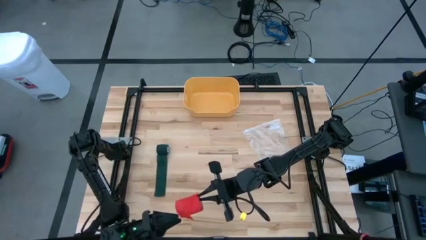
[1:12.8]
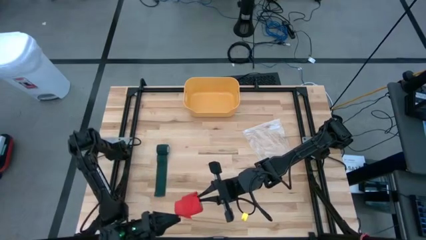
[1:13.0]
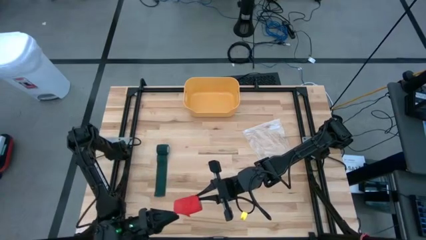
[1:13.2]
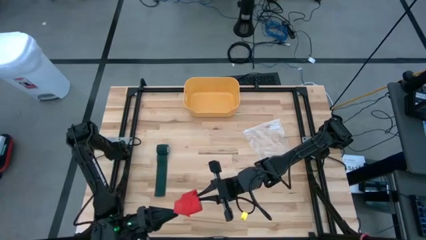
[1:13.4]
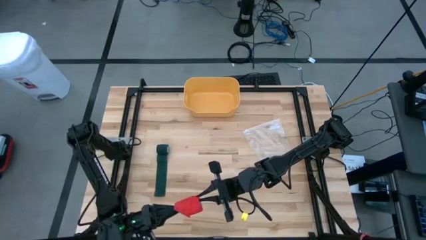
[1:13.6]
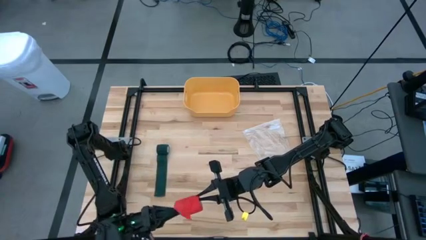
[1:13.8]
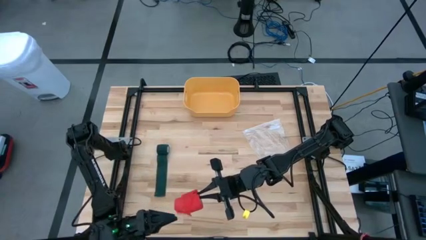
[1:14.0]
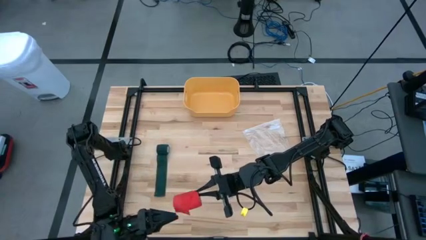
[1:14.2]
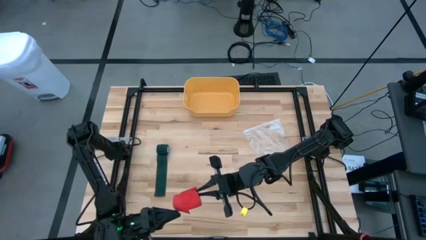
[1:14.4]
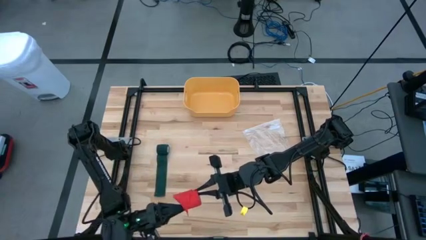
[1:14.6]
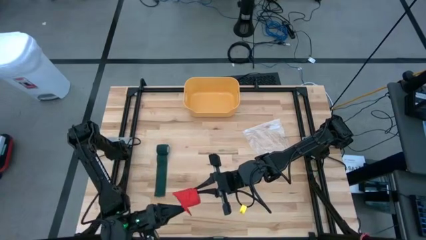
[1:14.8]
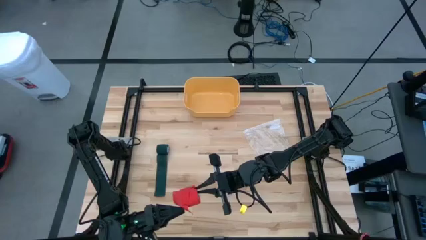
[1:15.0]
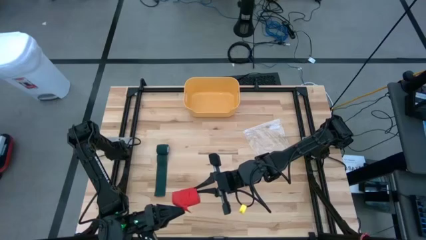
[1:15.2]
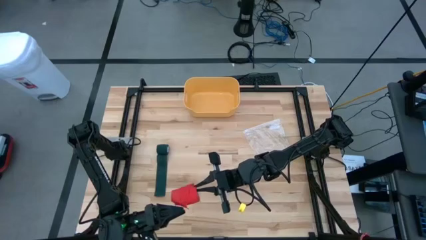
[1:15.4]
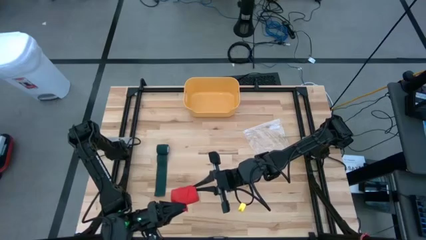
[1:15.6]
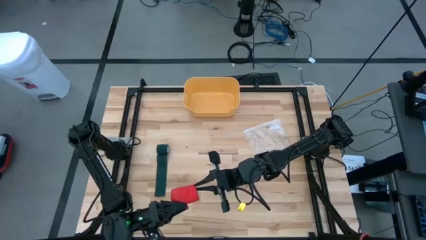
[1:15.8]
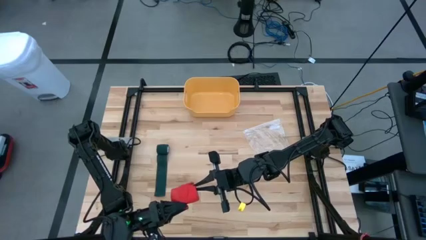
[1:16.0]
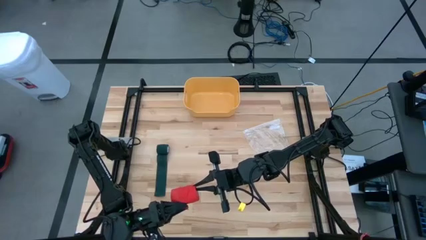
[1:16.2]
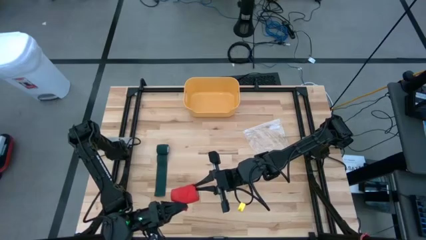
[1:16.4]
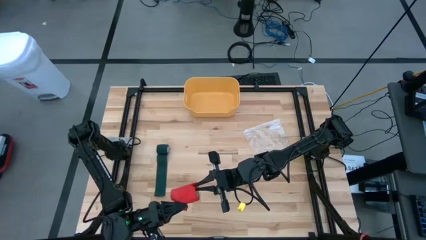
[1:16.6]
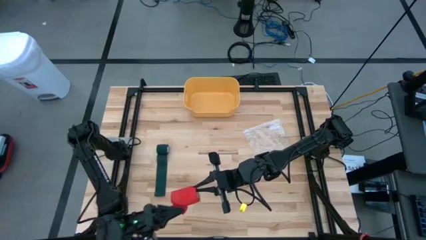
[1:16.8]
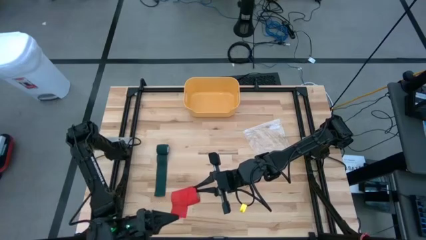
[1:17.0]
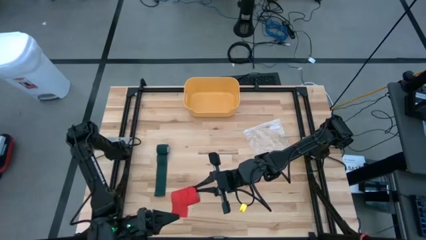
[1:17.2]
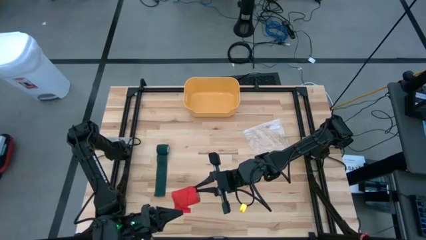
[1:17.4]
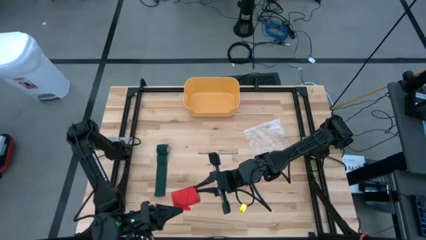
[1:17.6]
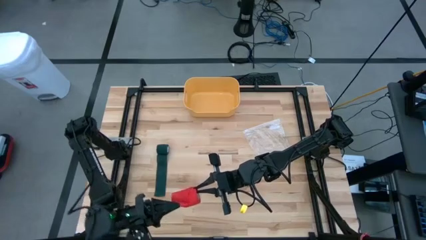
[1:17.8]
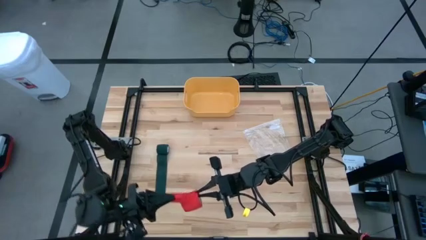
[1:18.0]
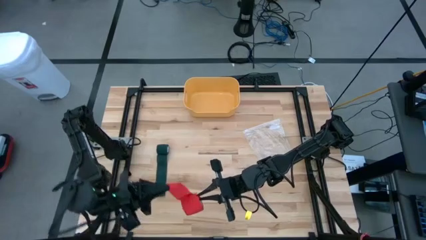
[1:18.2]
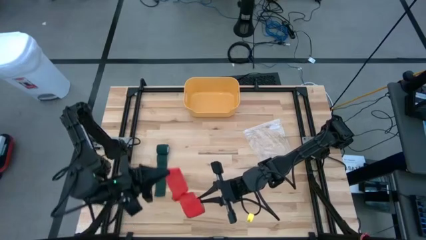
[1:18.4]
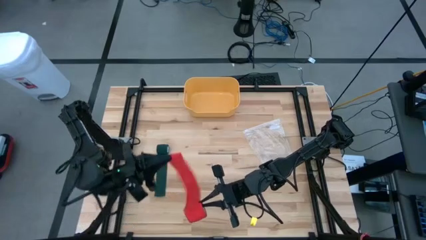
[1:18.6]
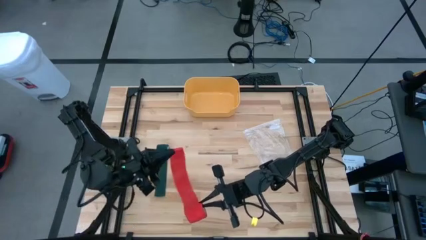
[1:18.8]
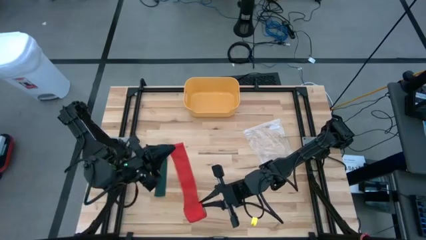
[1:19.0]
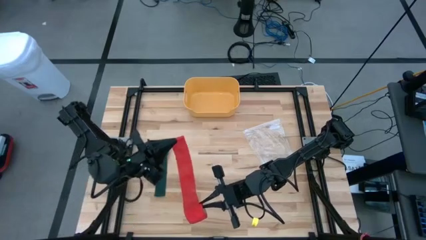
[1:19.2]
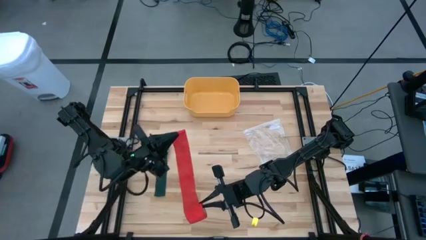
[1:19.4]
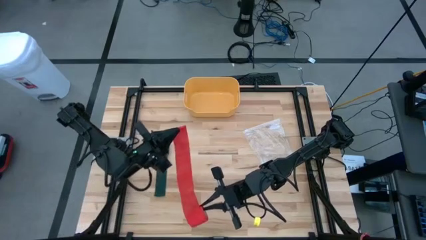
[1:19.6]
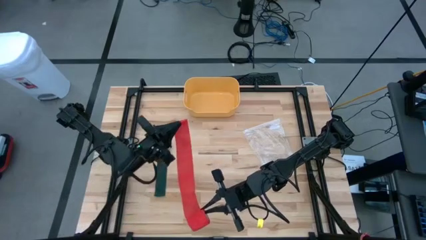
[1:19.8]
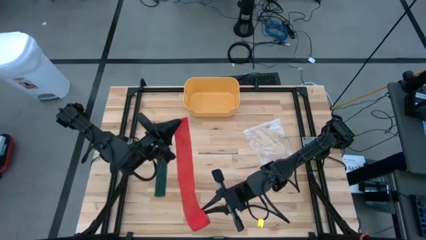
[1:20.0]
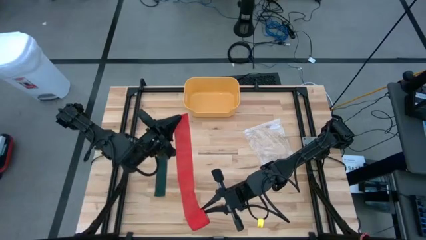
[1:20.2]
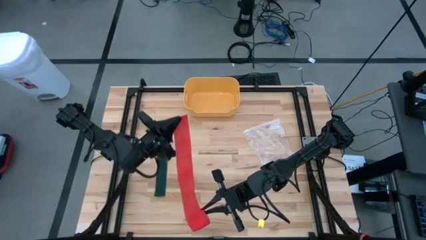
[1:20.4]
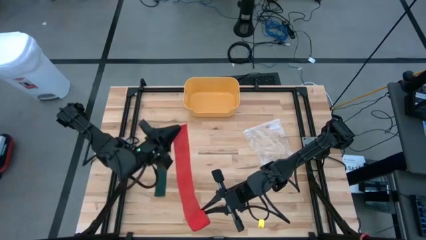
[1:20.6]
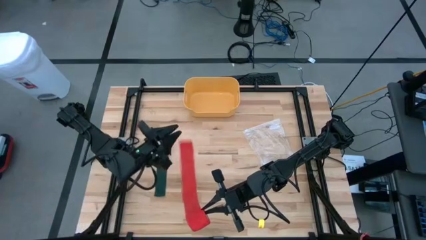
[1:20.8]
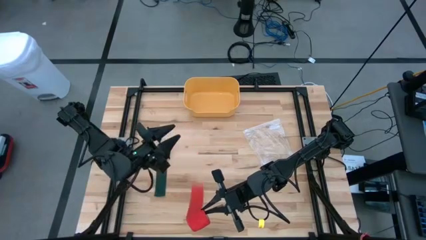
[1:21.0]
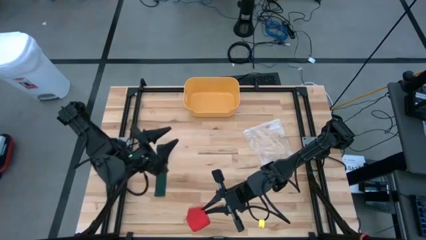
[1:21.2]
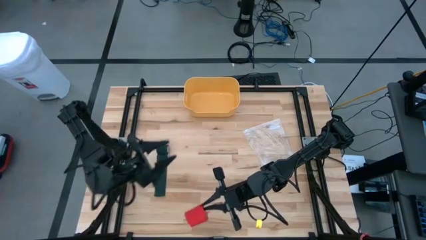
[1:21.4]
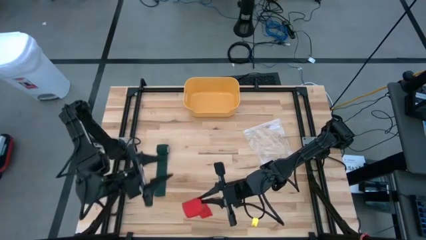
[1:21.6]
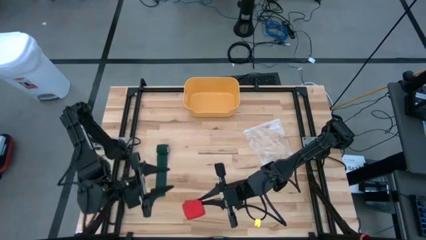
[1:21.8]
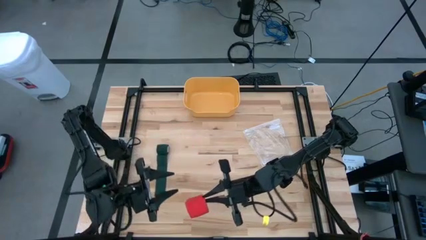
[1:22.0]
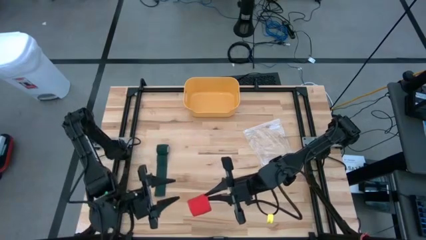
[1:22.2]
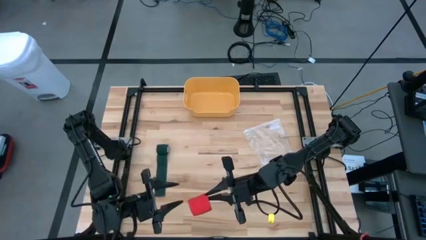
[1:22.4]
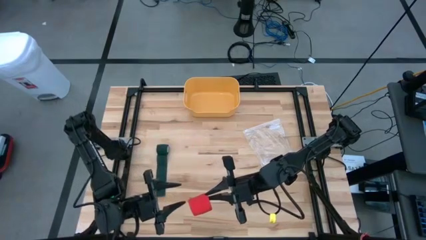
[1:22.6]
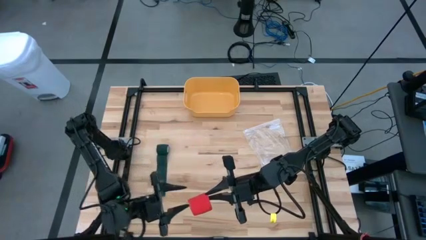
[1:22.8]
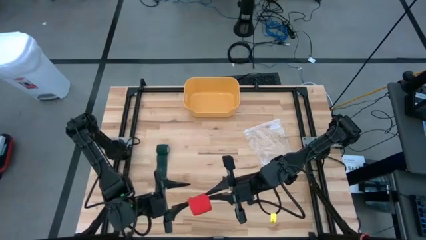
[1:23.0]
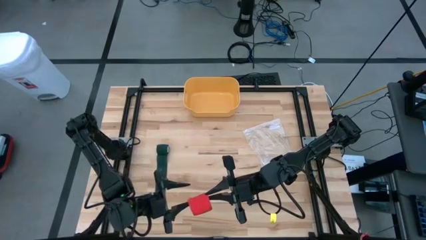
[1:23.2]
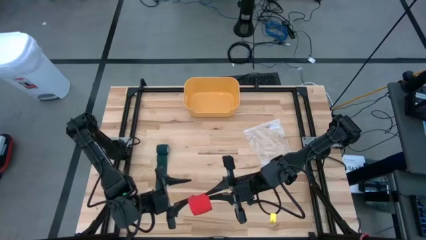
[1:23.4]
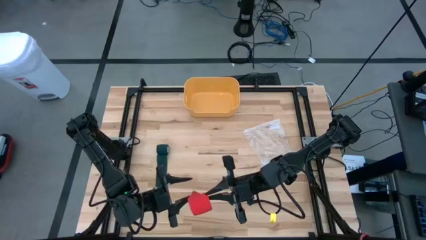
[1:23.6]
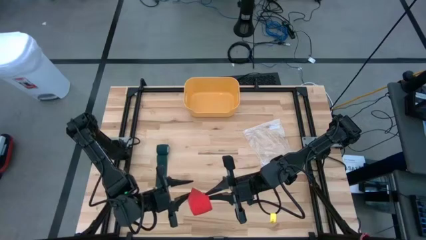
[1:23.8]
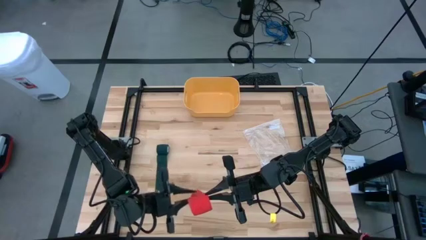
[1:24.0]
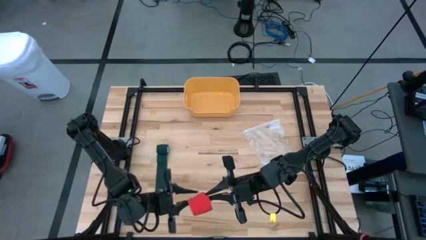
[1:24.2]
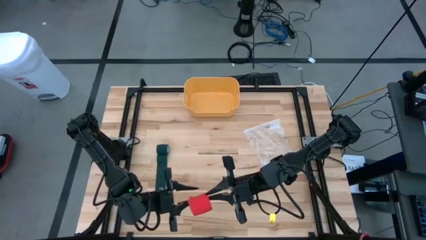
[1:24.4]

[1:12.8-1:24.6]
Task: Roll bandage
Roll the red bandage

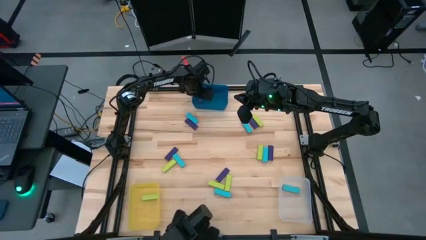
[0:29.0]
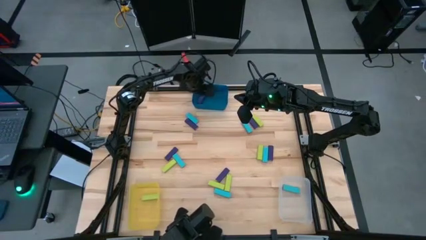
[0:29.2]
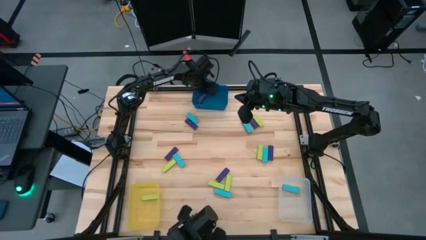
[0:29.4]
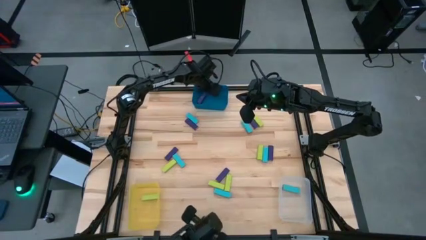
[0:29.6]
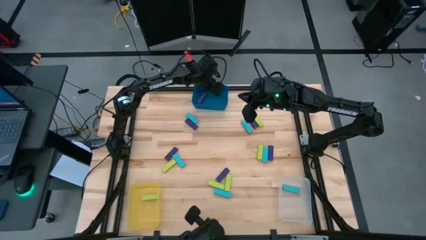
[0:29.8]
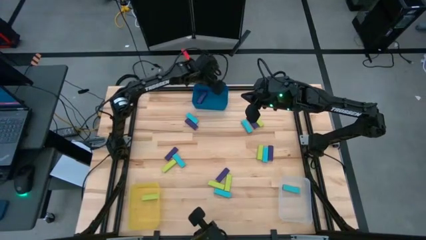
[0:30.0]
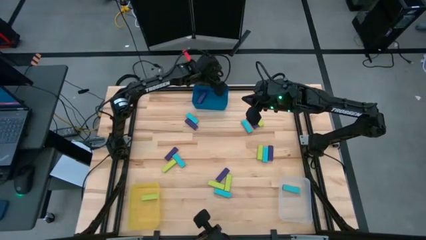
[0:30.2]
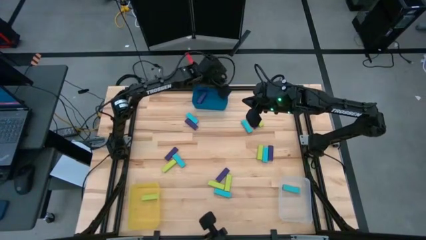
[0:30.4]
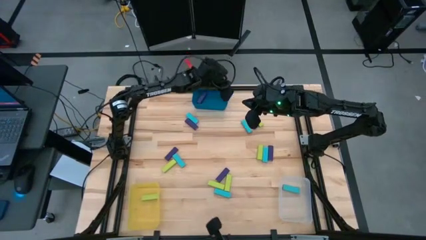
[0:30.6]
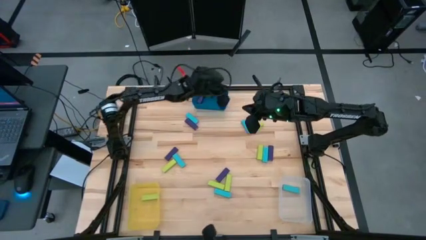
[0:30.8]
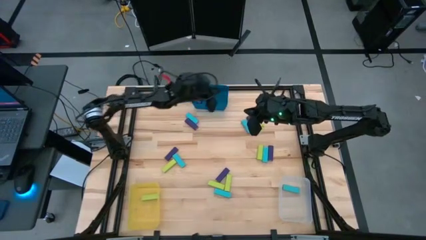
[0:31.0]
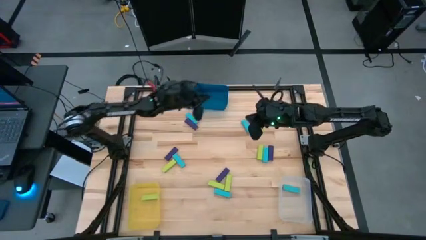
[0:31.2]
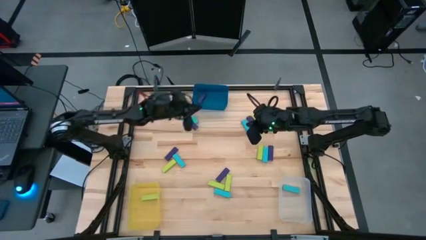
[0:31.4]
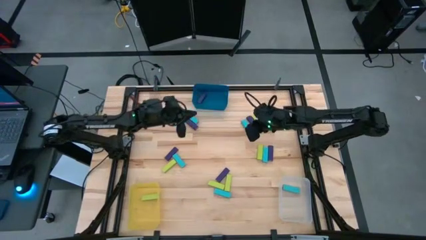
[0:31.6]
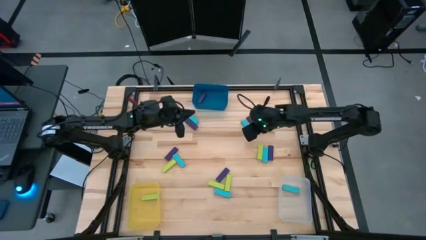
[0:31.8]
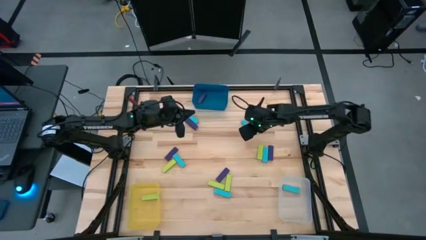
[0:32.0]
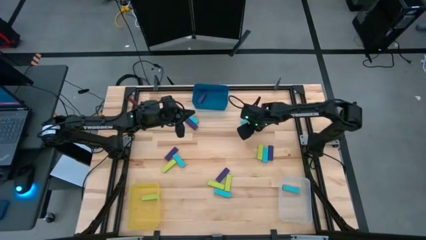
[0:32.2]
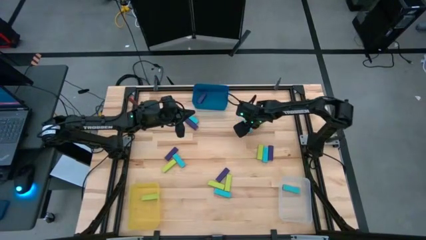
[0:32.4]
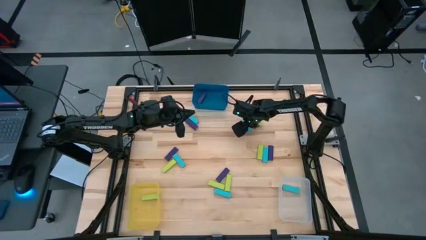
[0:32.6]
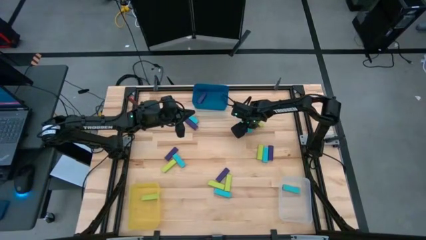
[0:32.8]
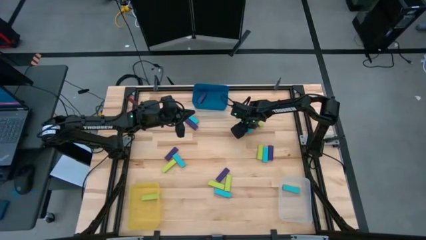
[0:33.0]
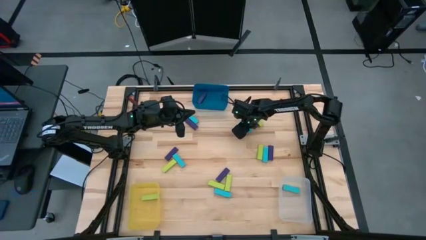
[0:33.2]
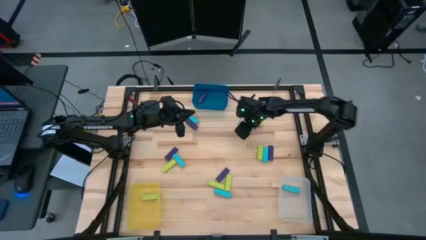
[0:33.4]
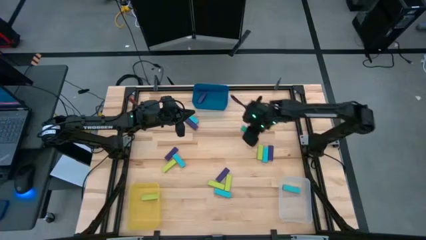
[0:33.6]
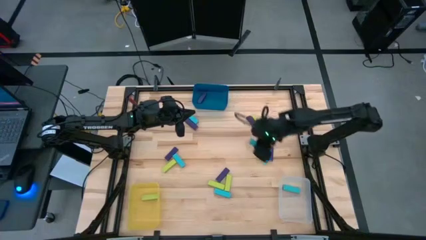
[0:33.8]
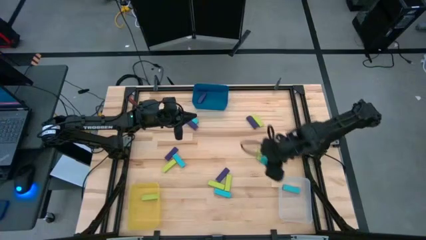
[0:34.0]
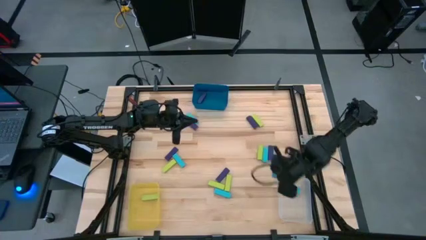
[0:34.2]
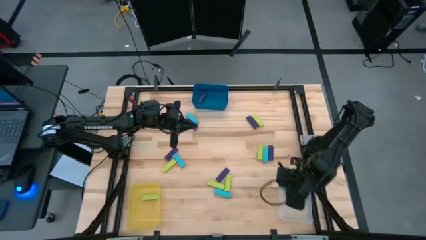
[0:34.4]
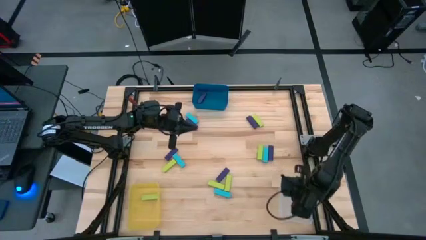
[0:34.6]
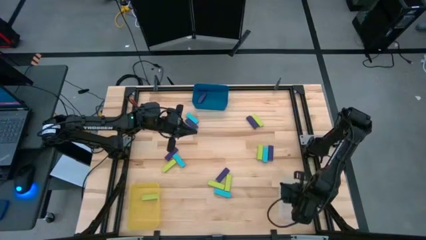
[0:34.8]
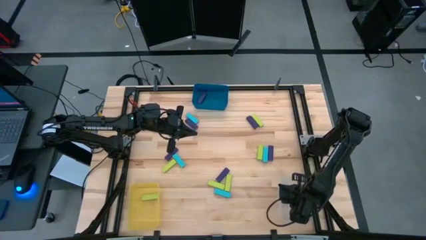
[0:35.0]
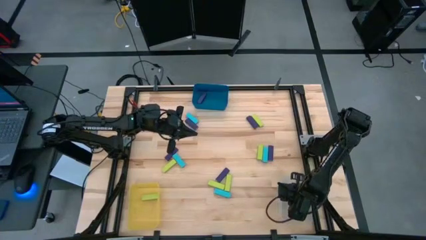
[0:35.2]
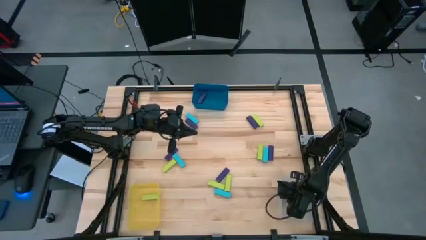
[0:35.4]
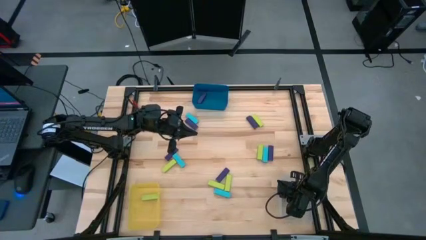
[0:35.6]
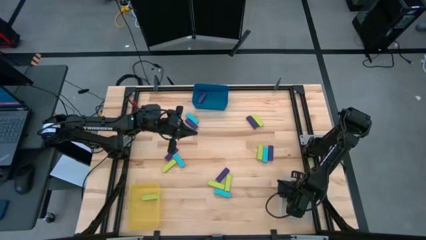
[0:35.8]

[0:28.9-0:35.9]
Task: Sort blocks
Put the sky blue block into the white bin
